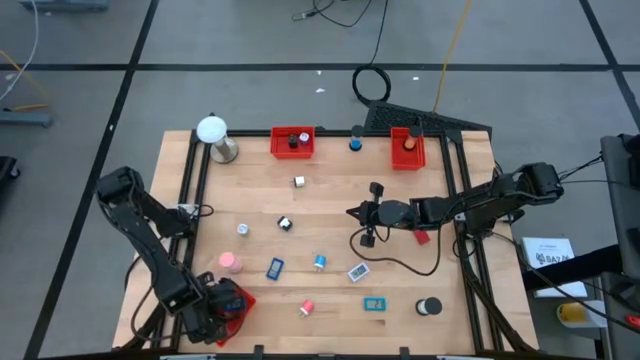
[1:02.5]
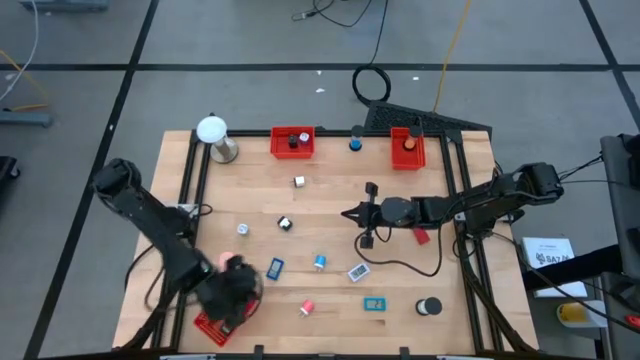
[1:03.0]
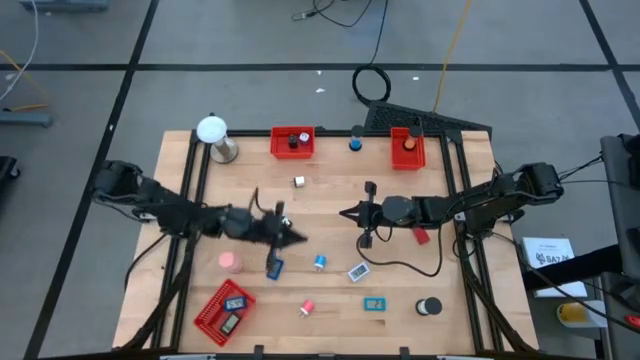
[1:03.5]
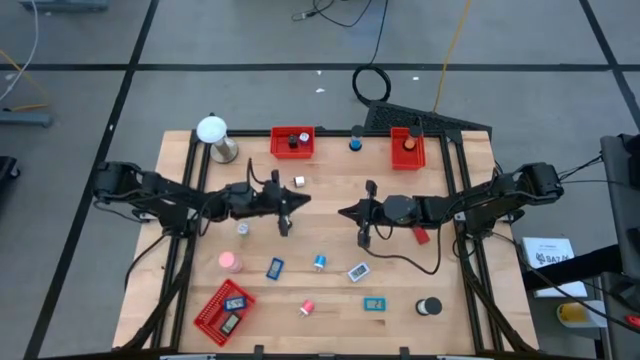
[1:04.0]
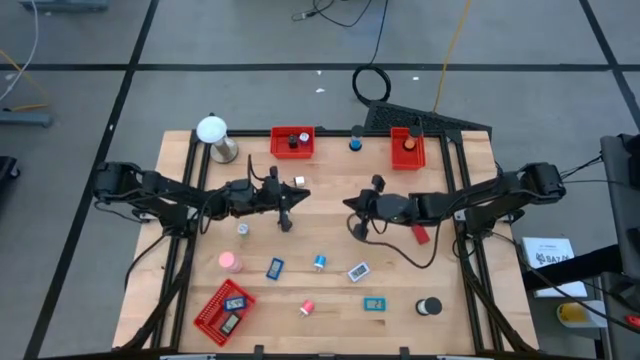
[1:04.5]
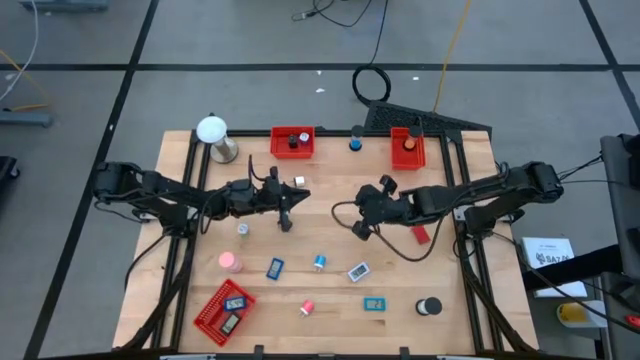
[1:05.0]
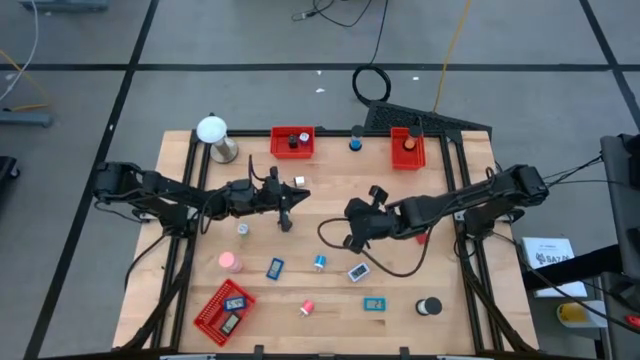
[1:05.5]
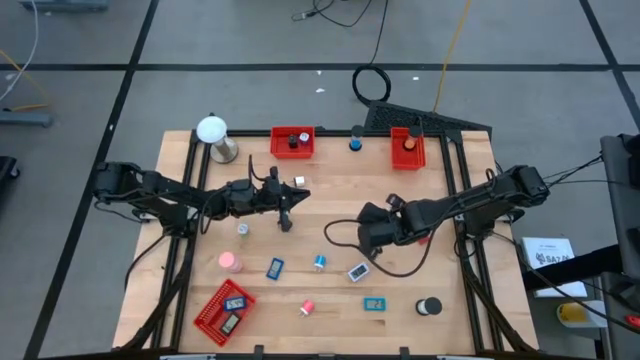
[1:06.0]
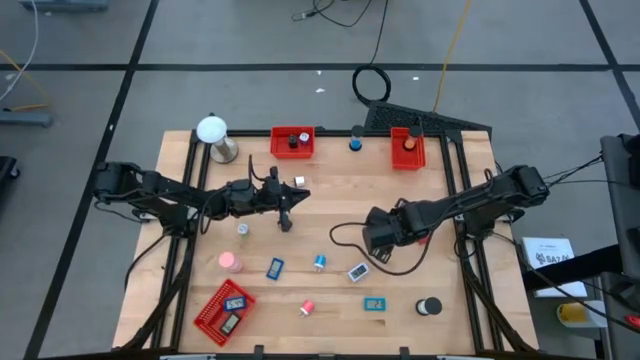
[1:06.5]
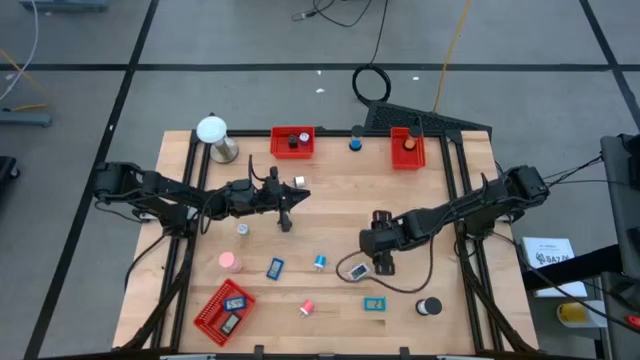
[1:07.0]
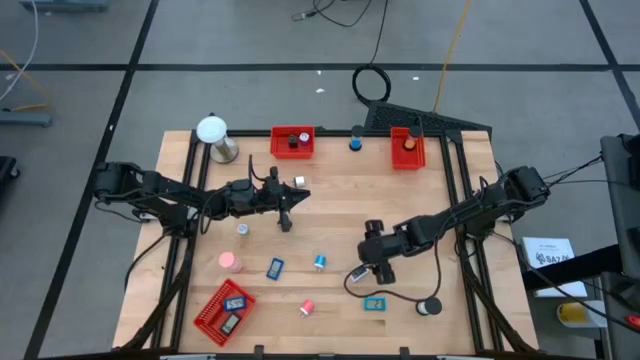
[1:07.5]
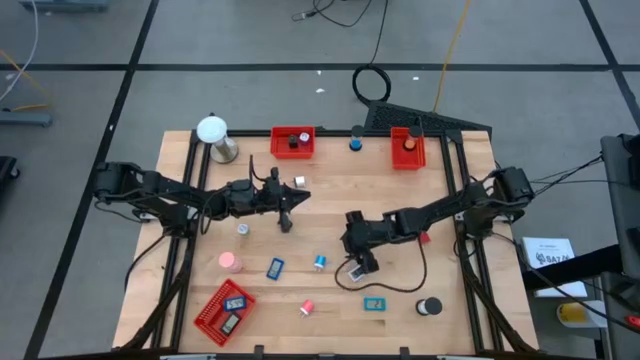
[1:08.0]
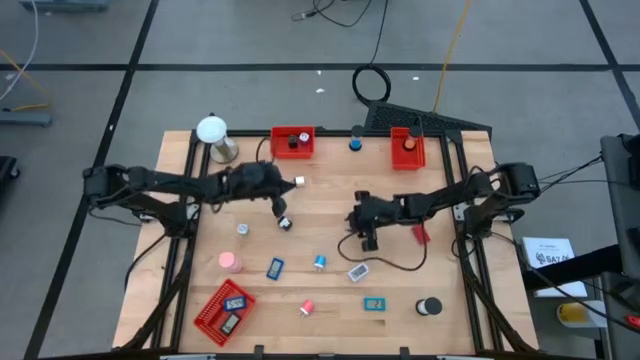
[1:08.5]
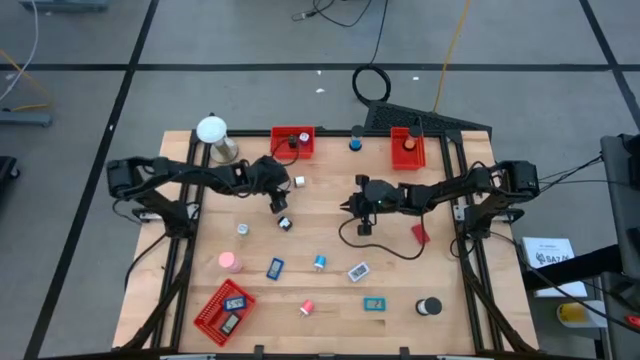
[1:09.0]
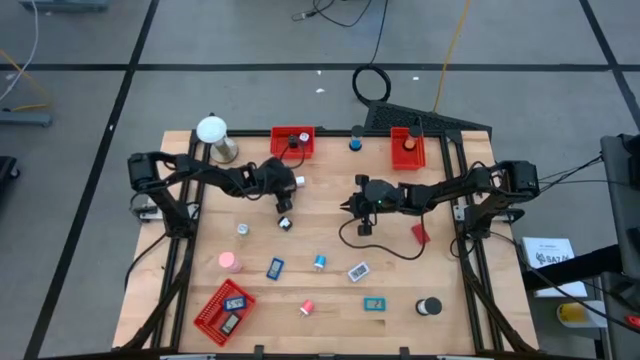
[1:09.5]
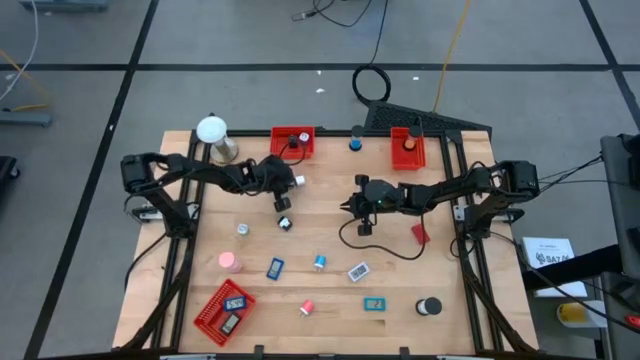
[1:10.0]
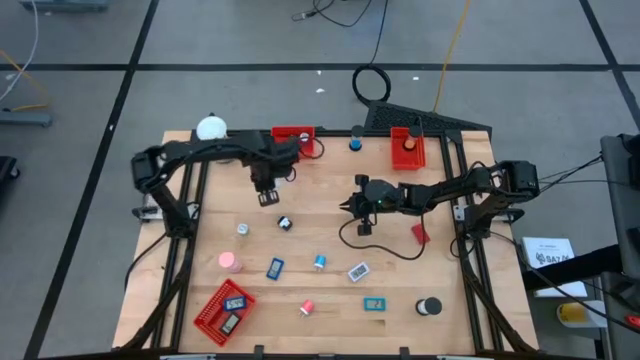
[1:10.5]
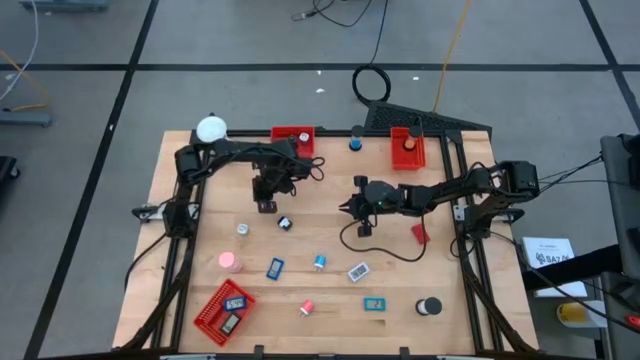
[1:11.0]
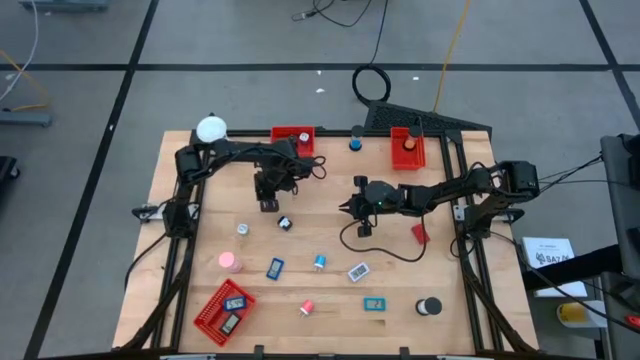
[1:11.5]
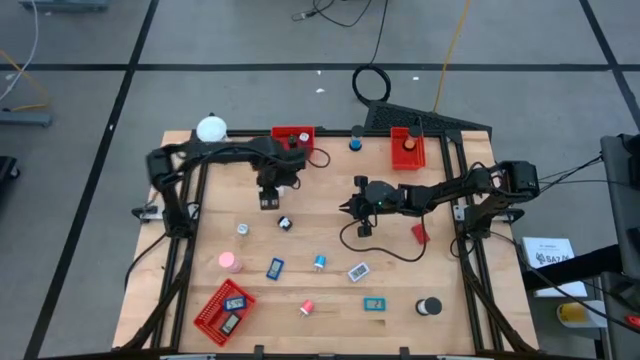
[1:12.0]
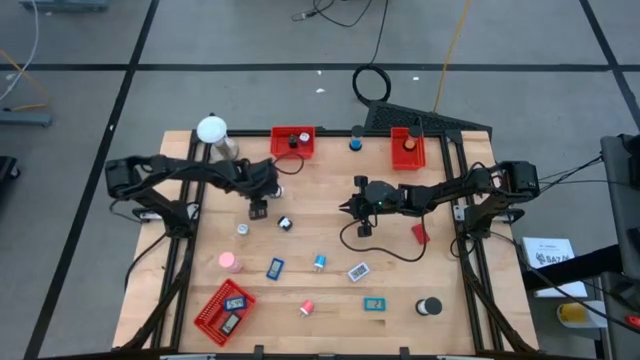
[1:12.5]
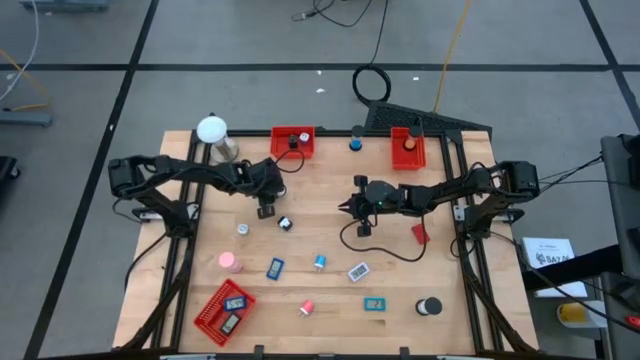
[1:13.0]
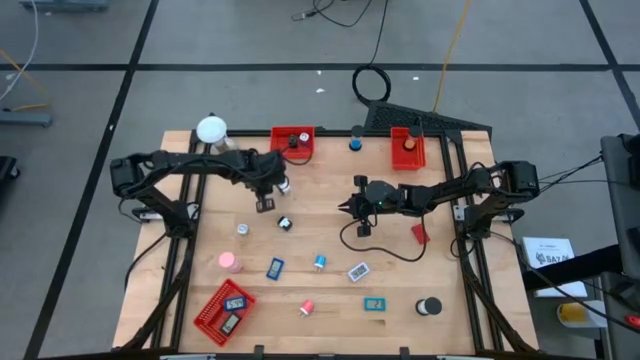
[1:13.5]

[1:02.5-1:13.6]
Task: Pick & Place Office items
Put the white charger adapter into the top left red basket

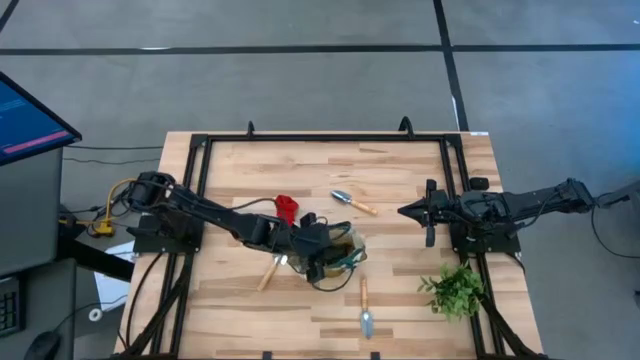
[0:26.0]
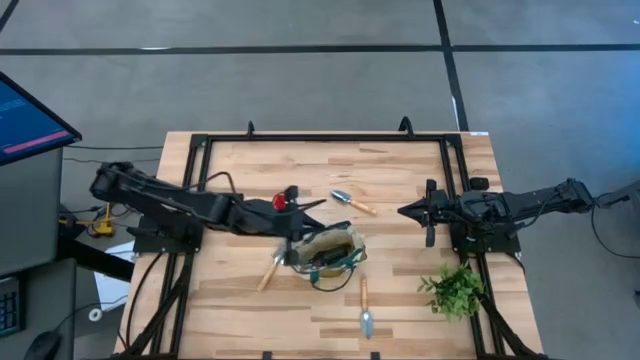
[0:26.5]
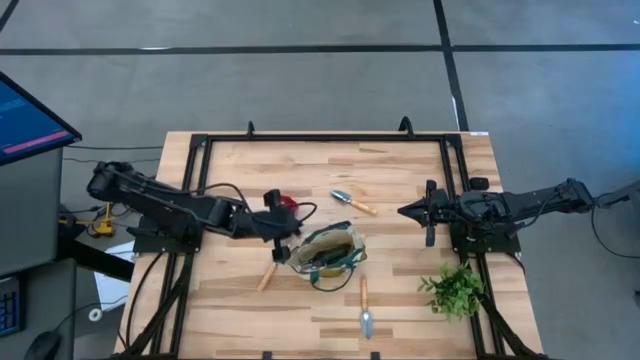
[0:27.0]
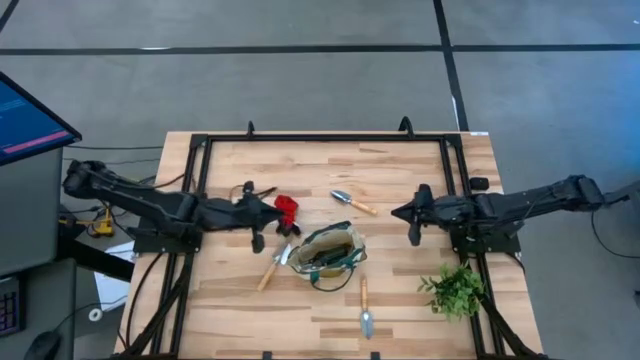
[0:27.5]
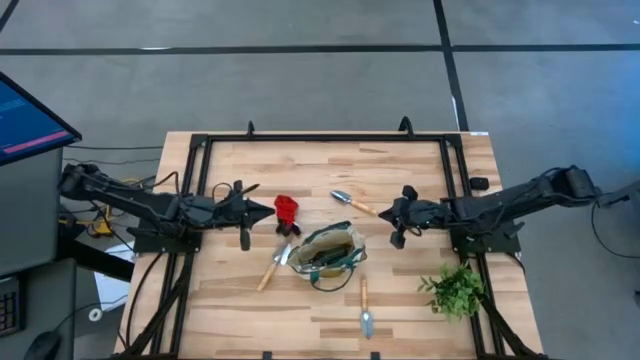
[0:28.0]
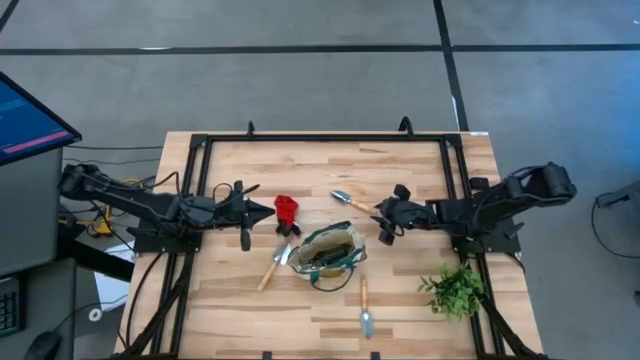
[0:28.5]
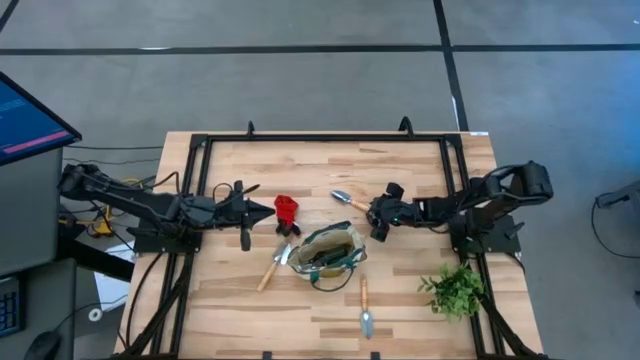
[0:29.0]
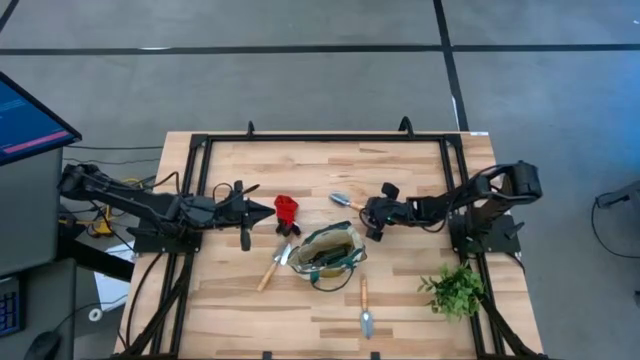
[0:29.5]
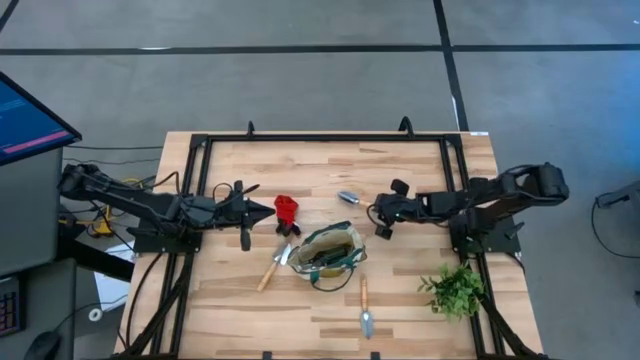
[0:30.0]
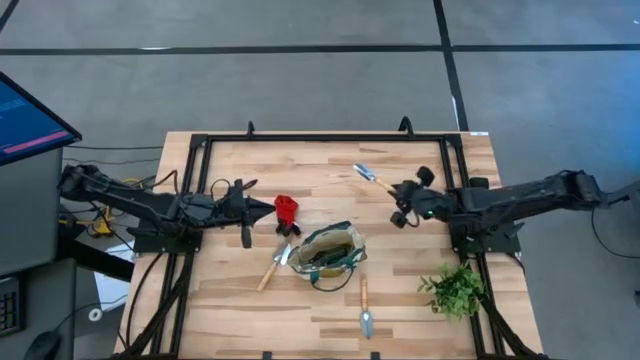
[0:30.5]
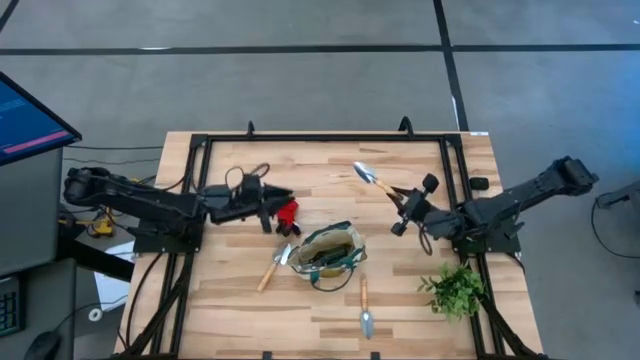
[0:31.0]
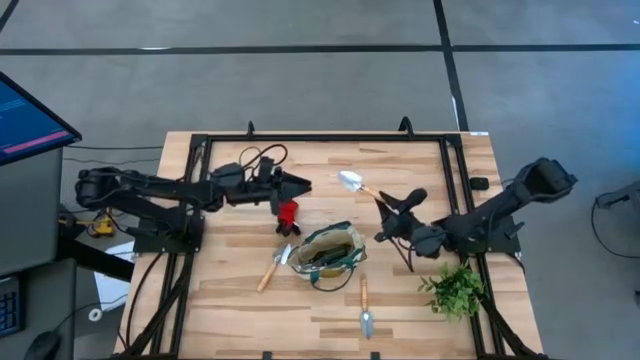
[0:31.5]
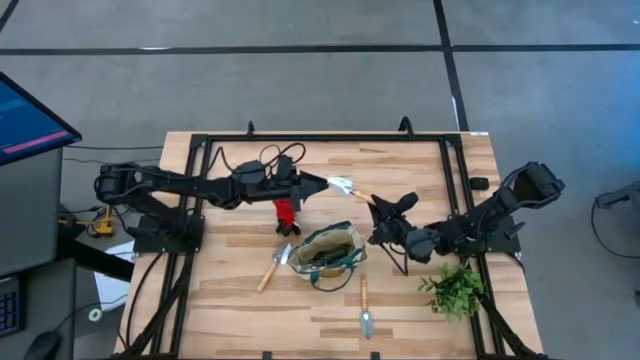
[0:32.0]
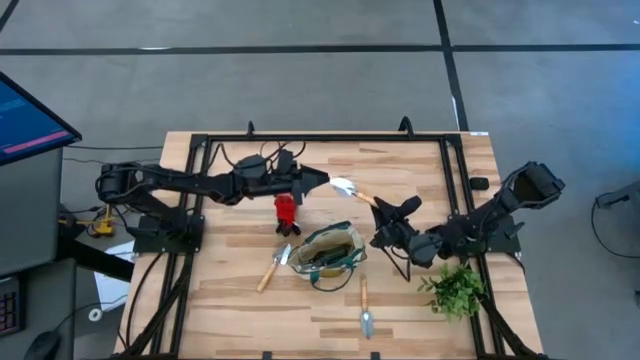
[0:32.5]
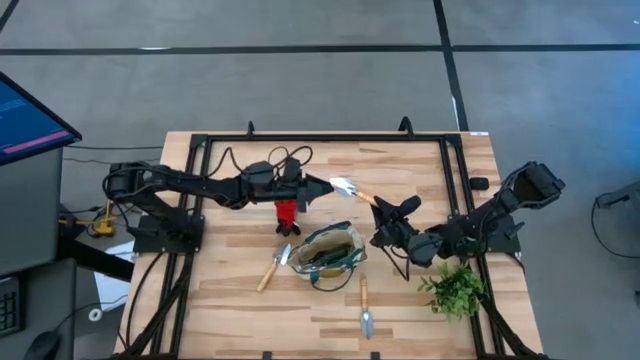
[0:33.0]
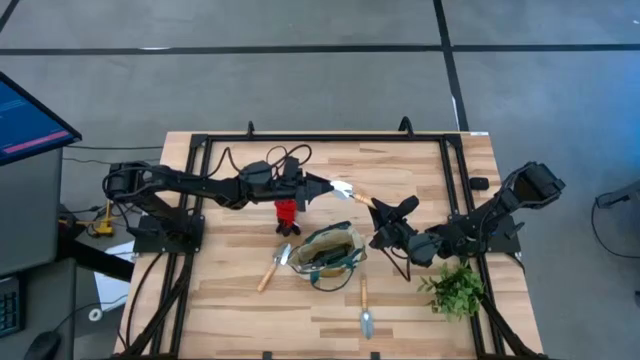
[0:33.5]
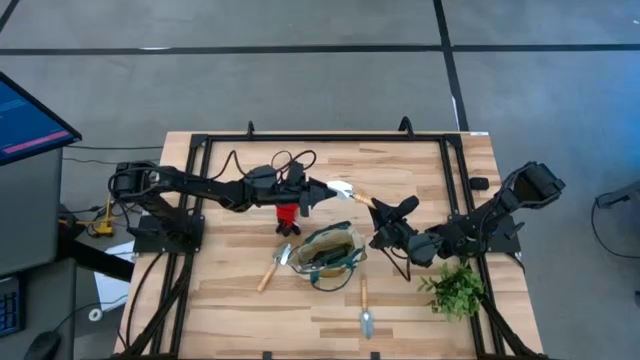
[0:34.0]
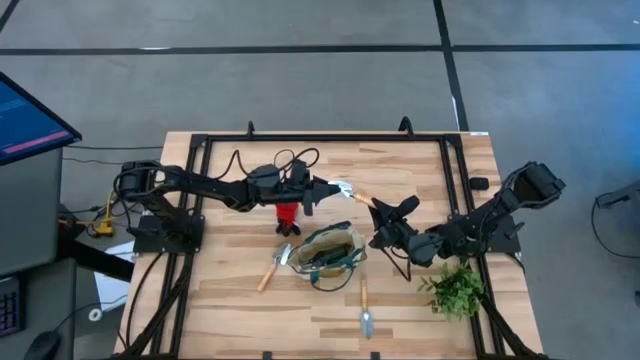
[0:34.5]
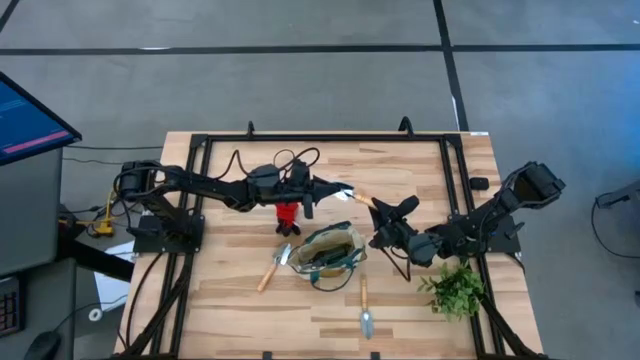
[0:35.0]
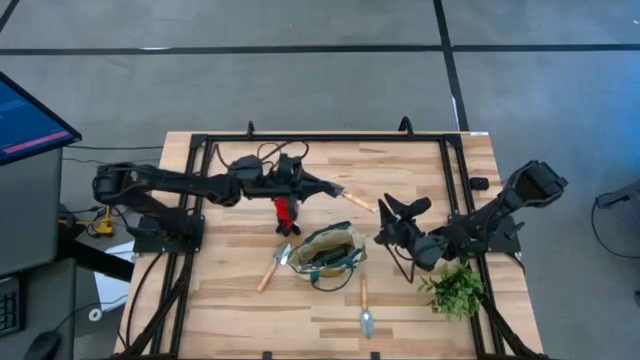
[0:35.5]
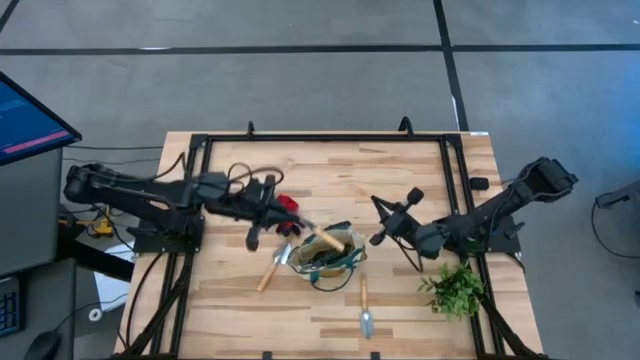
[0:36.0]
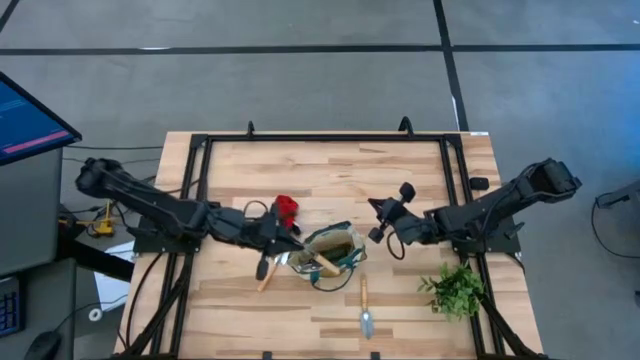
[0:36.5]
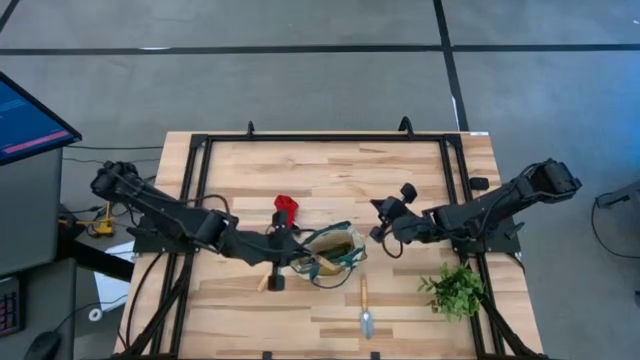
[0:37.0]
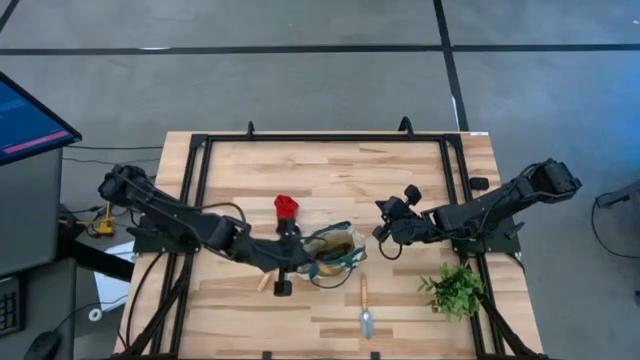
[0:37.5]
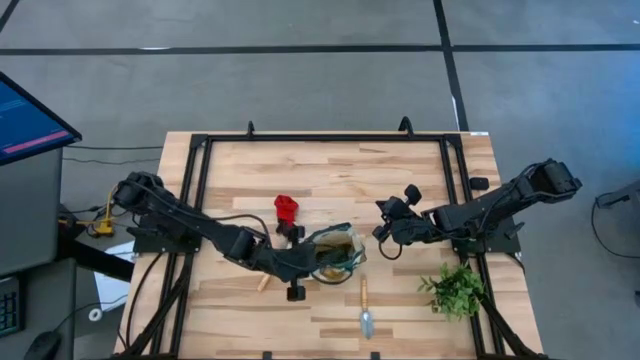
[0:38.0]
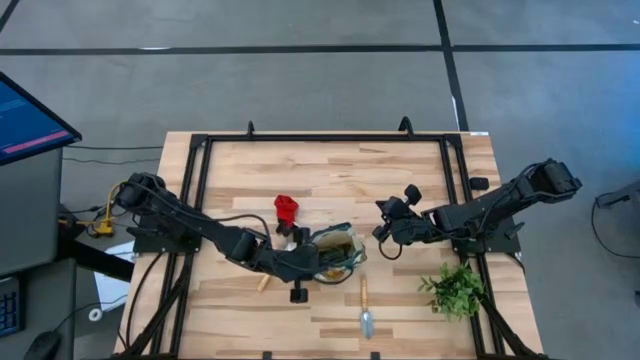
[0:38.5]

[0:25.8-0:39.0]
Task: Pick & Place Garden tools in Gardening bag
Put the top trowel into the gardening bag
